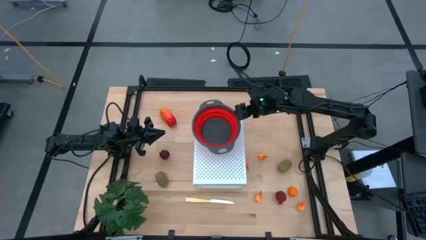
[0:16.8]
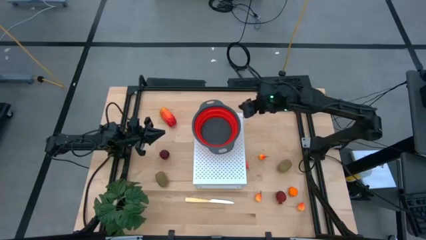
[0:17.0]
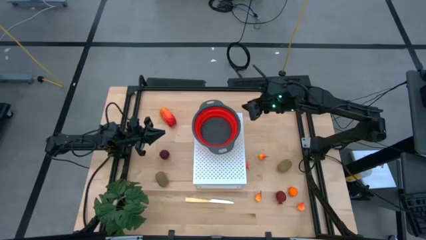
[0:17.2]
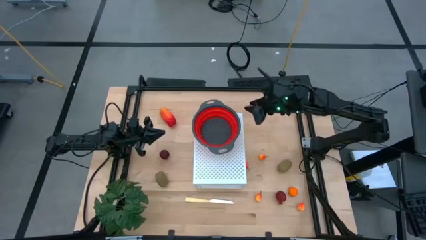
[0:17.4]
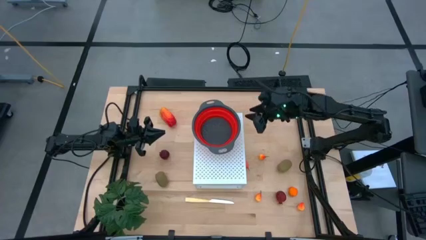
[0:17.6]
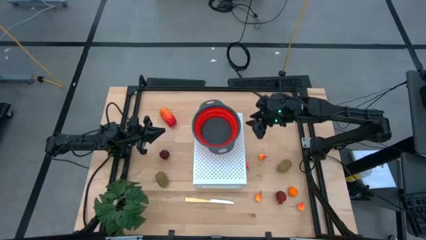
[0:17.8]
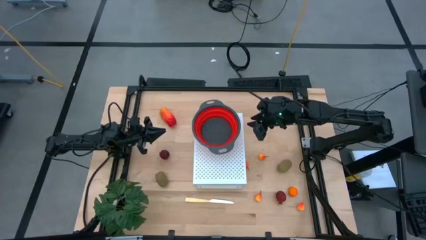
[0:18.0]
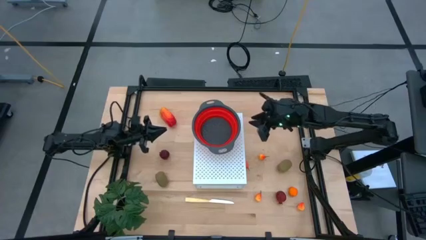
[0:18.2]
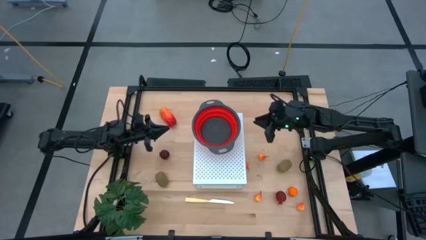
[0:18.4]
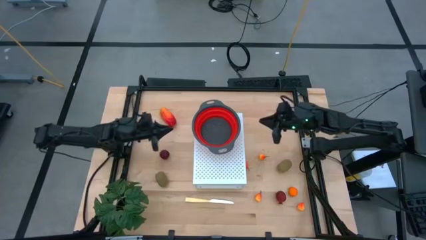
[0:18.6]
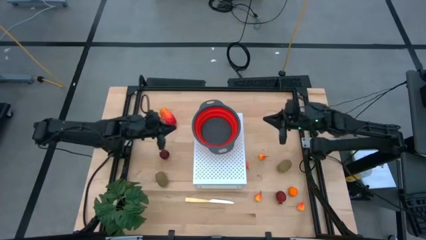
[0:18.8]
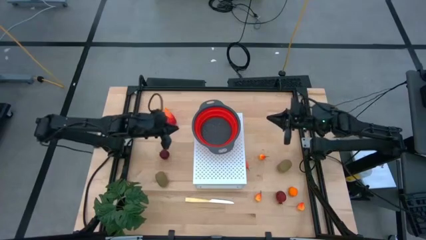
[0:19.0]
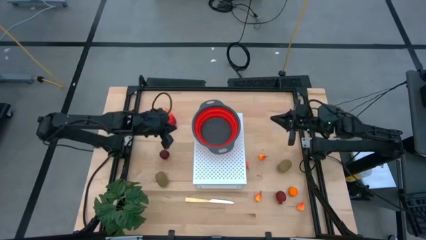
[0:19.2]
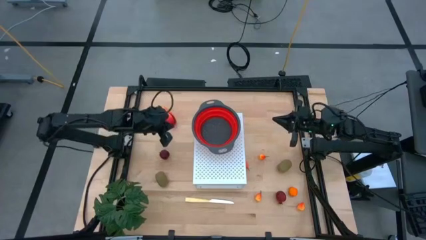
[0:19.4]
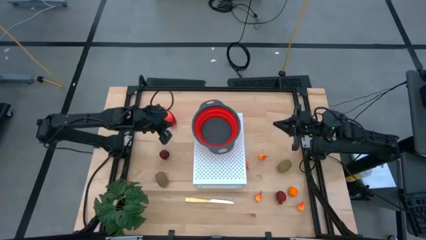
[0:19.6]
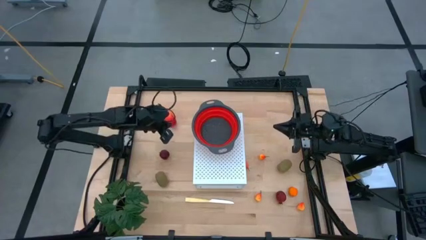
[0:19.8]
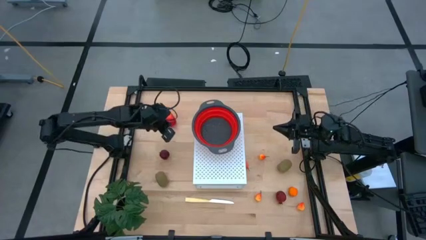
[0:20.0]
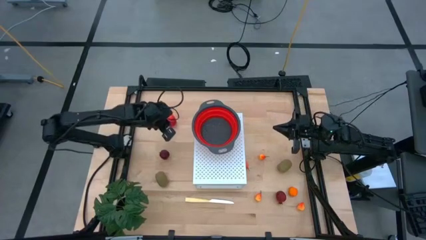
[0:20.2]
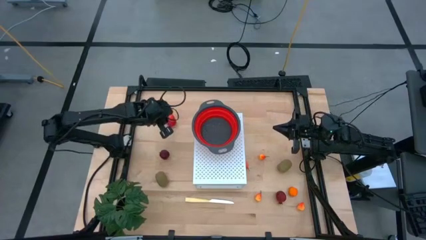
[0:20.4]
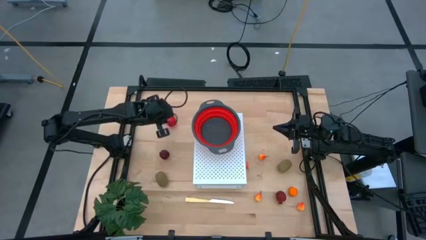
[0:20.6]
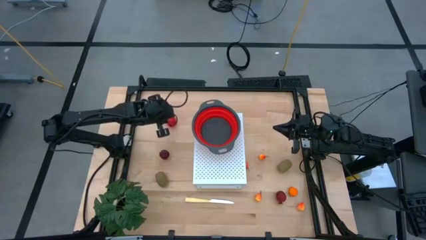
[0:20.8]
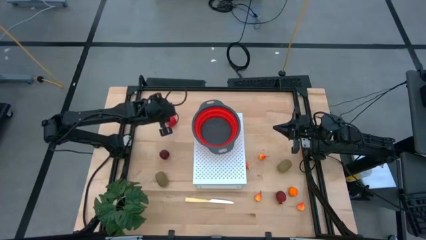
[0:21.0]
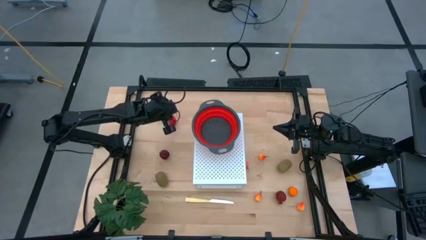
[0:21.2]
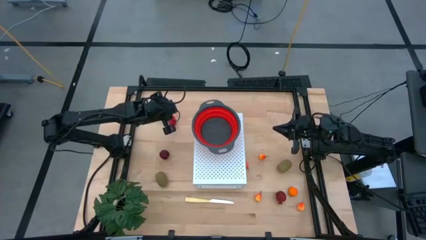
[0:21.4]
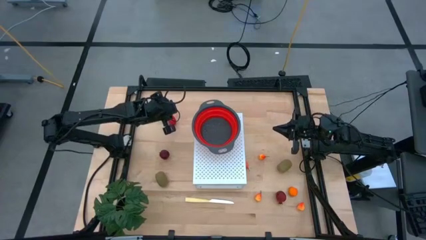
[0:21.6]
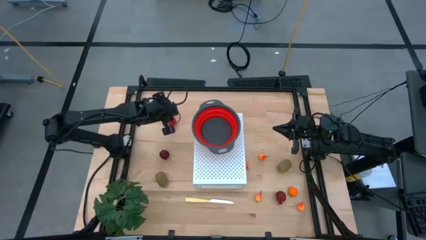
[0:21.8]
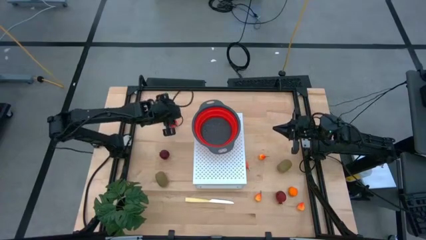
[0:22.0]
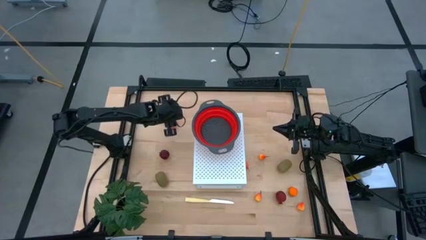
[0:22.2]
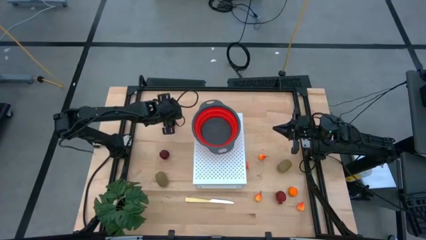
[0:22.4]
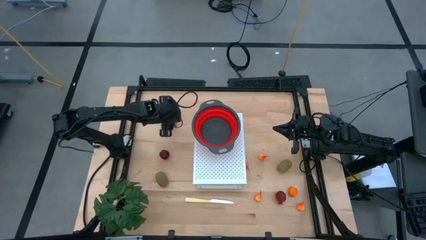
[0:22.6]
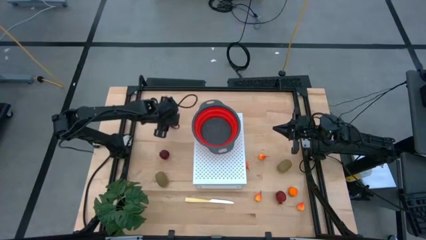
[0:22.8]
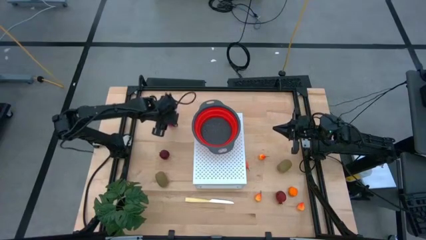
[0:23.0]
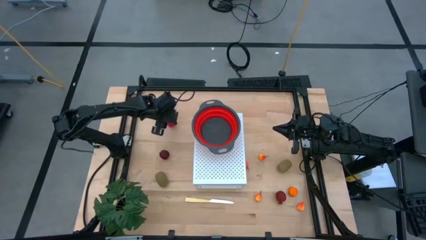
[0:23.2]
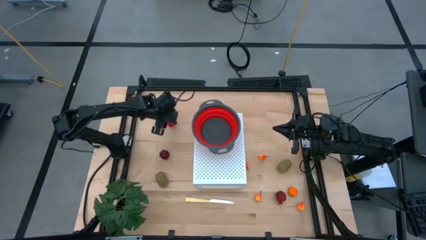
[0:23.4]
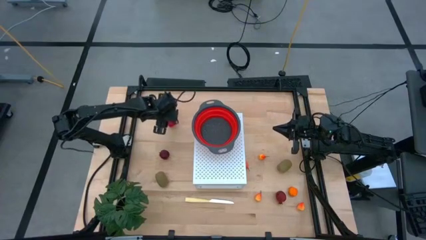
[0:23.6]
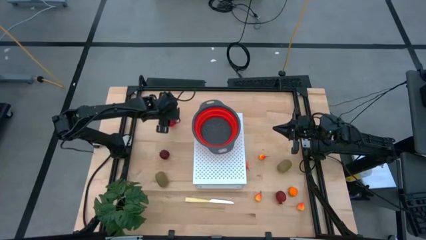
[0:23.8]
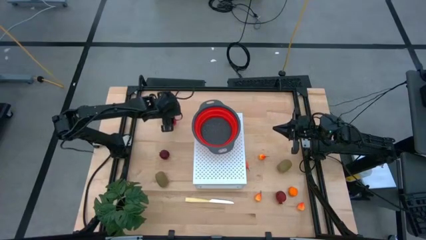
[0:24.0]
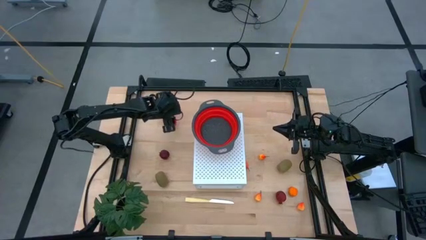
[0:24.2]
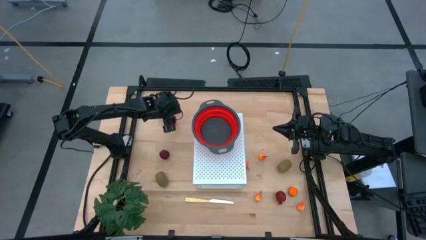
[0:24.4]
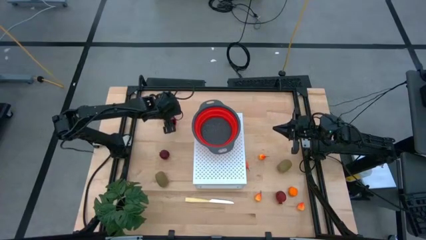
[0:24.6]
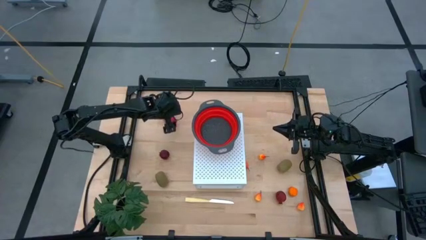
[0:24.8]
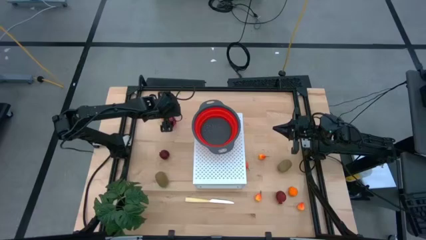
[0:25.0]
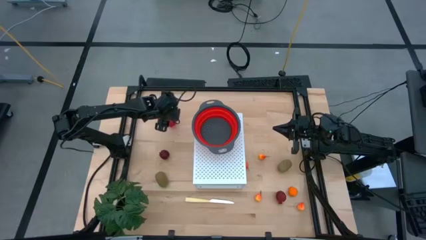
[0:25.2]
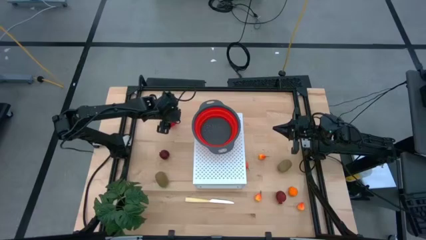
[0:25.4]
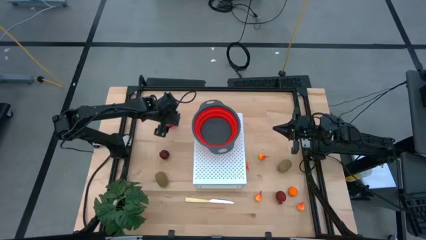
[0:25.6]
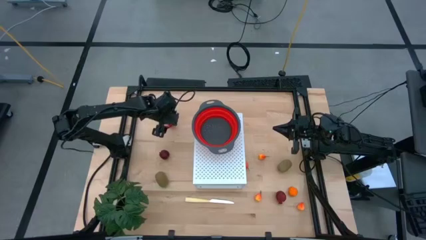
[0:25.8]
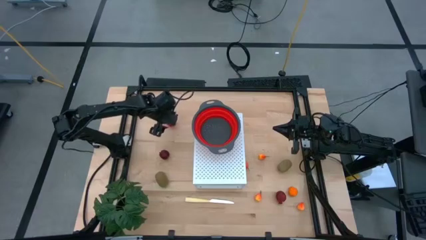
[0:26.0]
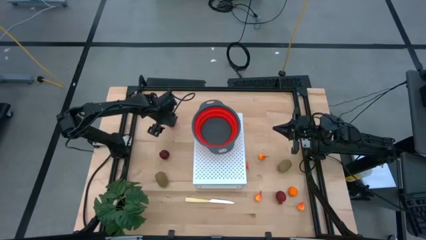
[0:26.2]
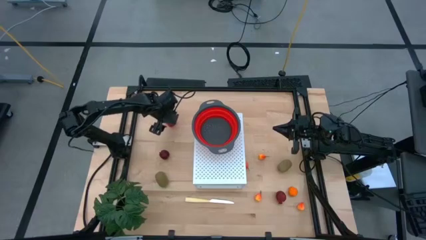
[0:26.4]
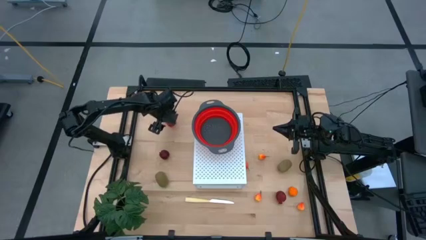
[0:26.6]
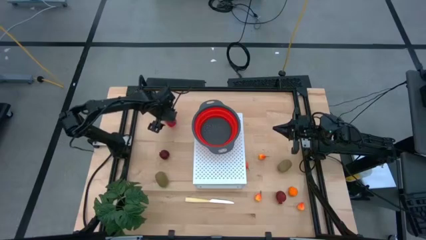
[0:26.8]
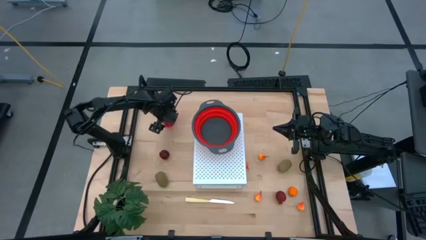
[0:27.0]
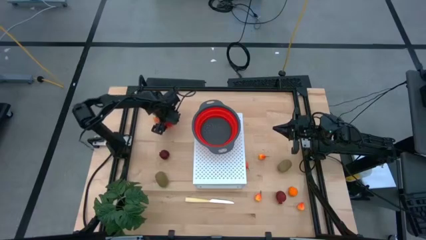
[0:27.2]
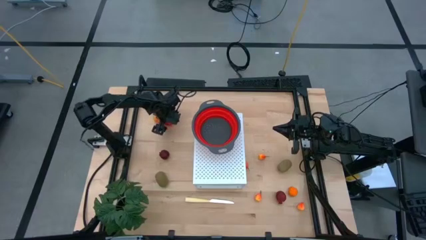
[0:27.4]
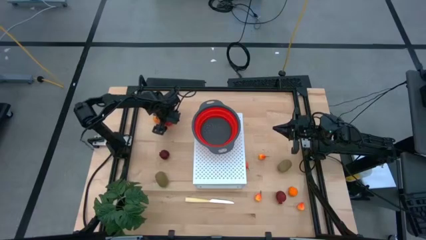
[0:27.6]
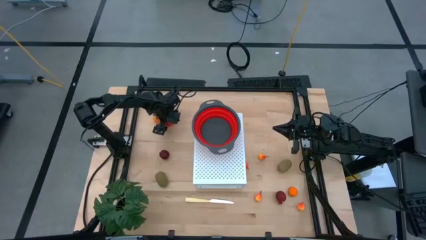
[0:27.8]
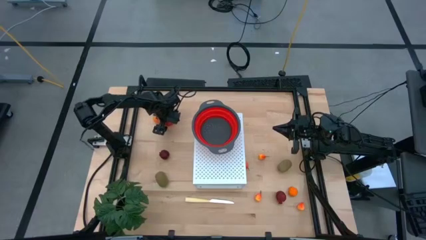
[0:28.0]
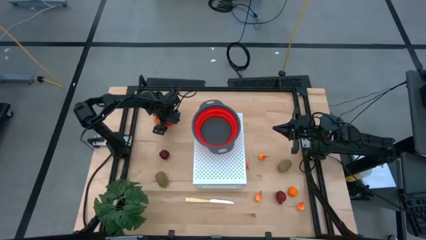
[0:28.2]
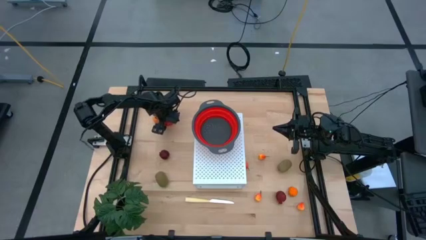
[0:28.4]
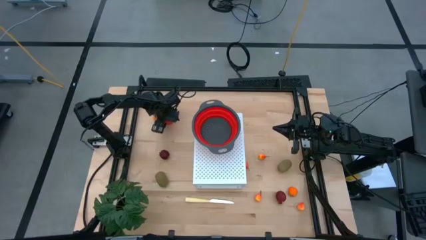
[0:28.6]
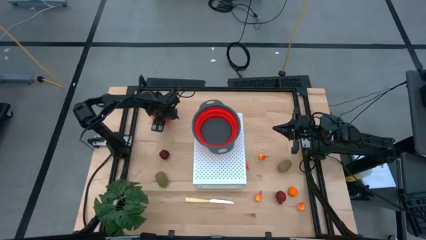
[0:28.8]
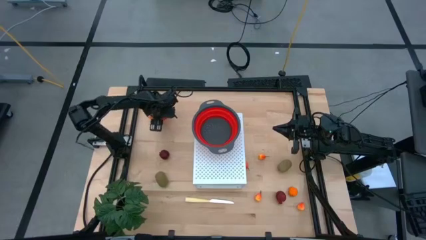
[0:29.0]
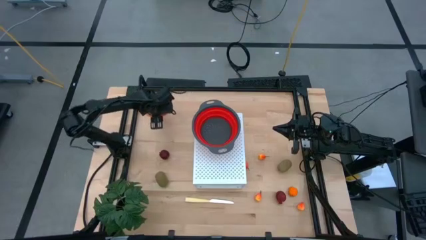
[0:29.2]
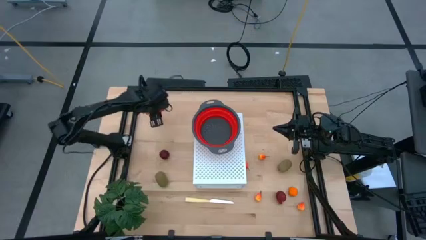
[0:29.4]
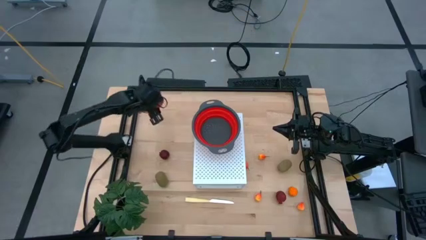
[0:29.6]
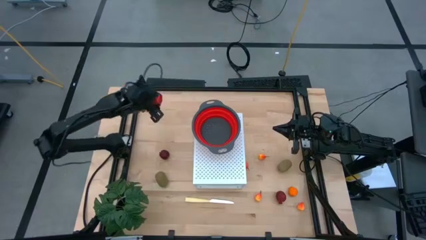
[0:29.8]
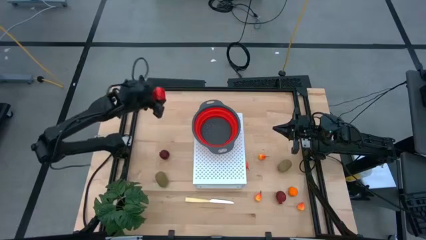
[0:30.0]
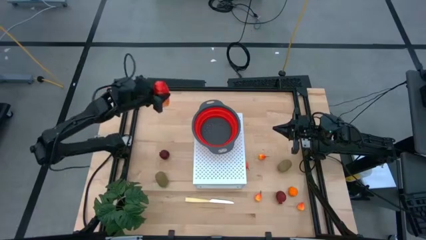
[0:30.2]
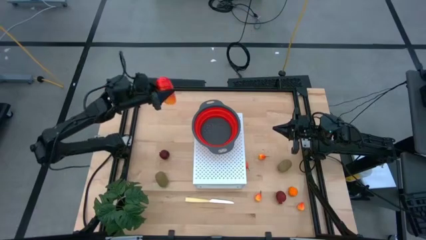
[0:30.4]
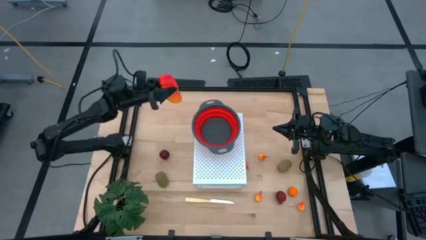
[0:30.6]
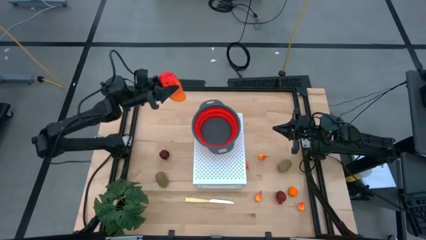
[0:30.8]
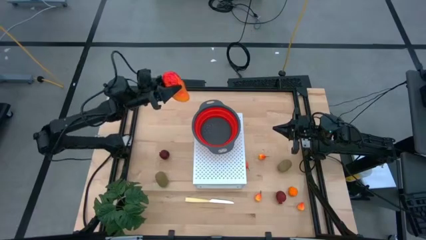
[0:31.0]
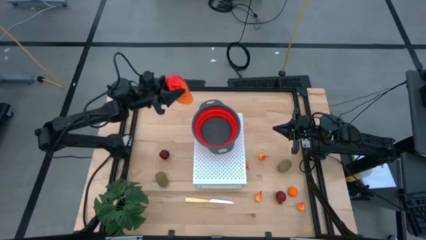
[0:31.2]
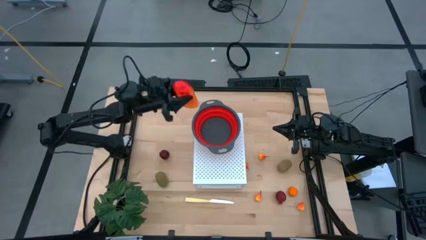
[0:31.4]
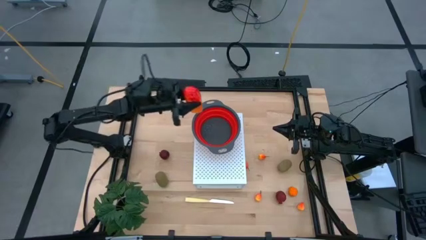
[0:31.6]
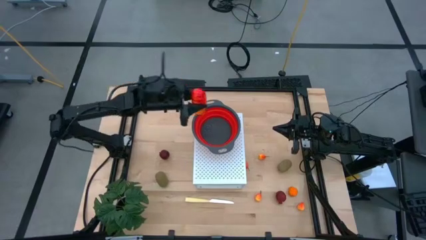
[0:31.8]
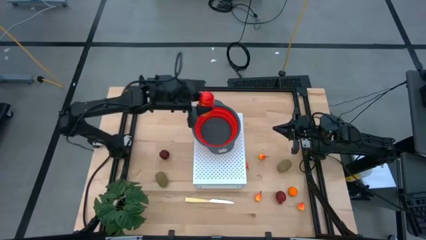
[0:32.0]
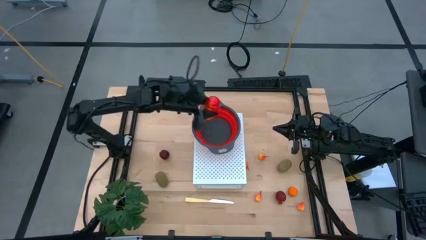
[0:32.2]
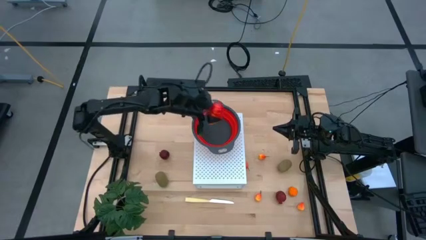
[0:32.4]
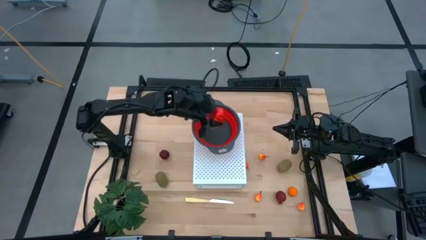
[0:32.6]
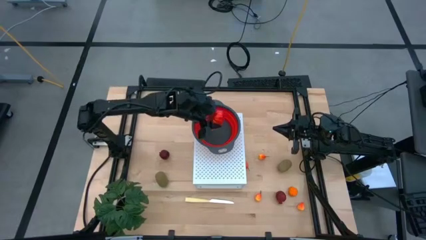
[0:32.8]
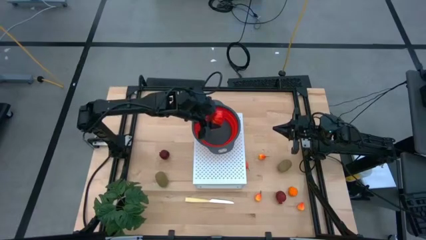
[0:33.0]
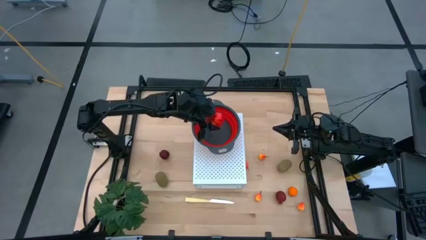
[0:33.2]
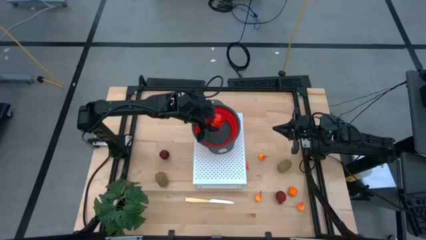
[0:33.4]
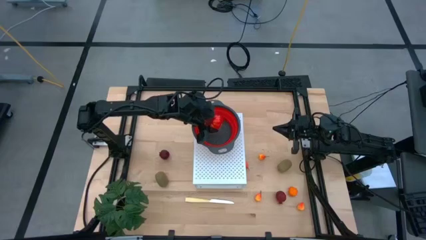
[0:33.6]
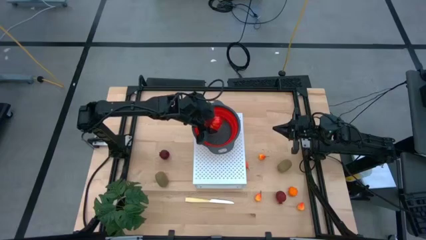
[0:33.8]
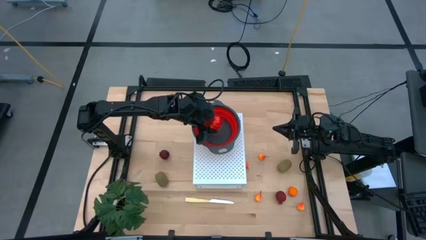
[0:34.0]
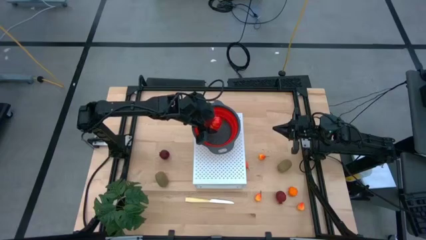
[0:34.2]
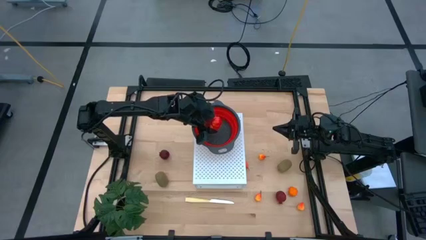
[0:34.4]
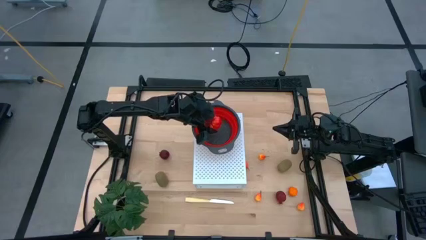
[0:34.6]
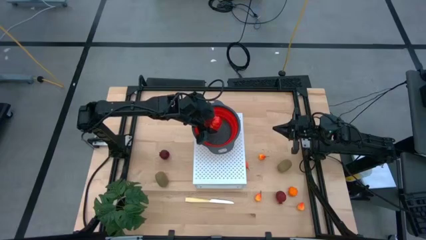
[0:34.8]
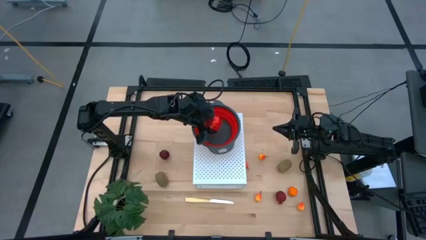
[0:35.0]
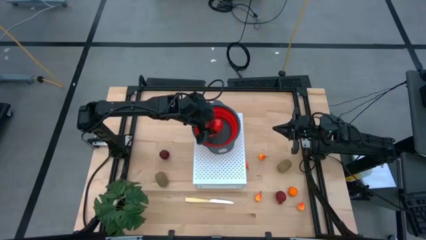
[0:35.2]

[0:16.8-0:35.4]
Task: Pick & Place Fruit
Put the mango into the red strainer bowl on the shelf
